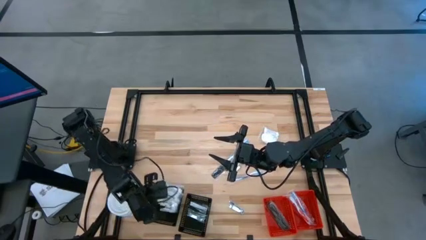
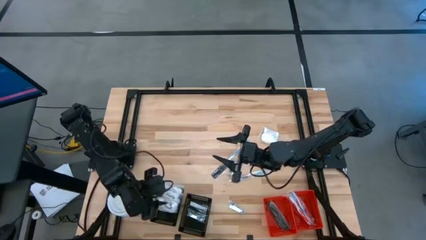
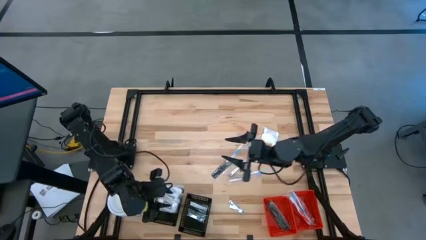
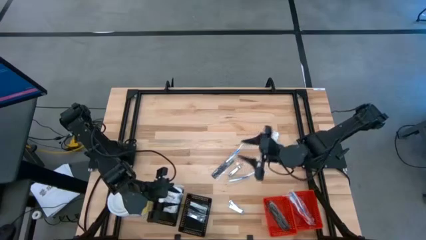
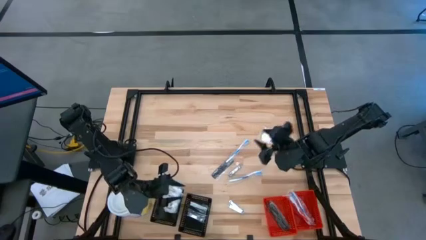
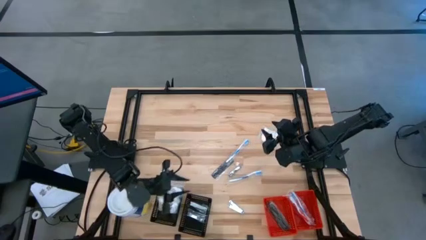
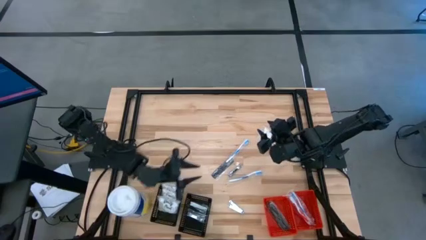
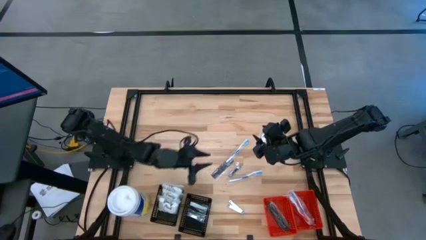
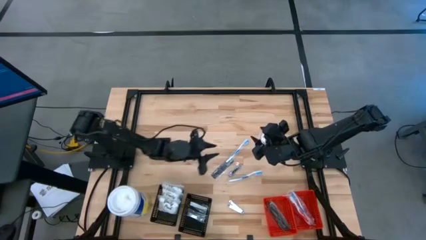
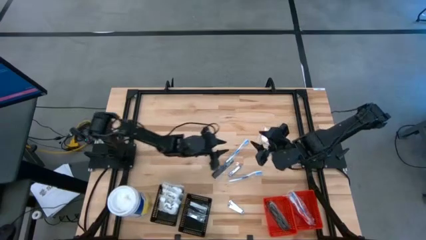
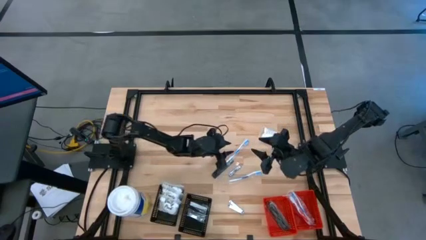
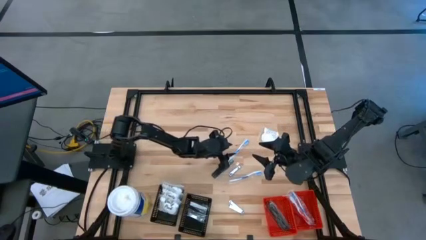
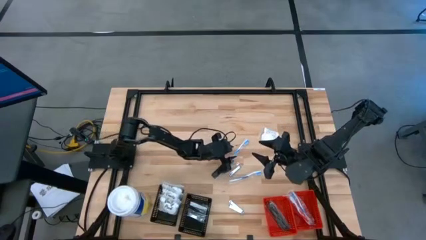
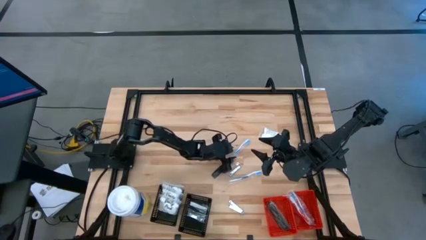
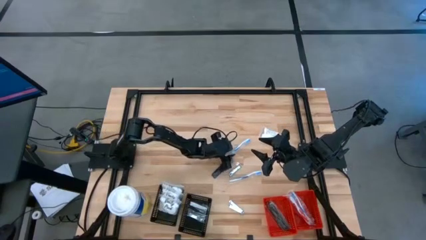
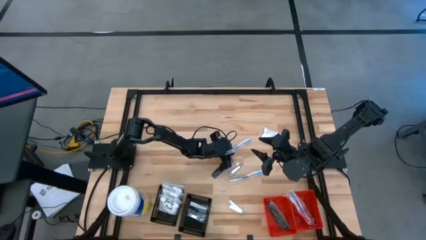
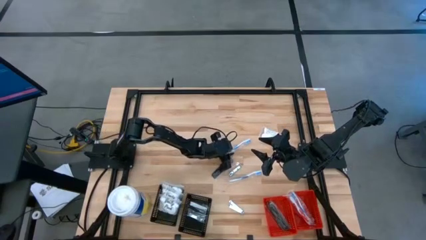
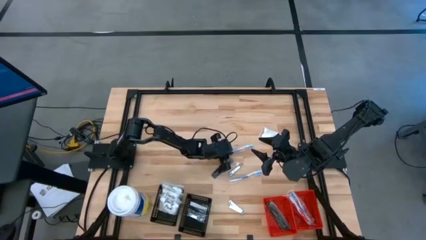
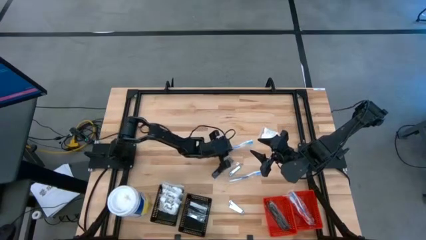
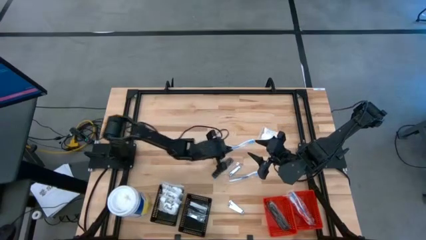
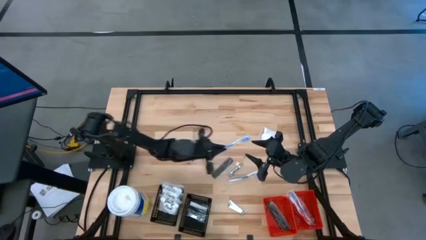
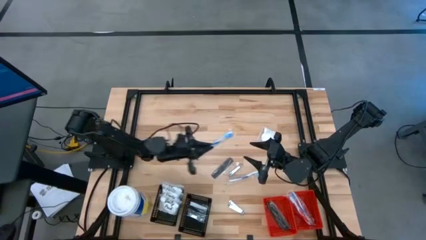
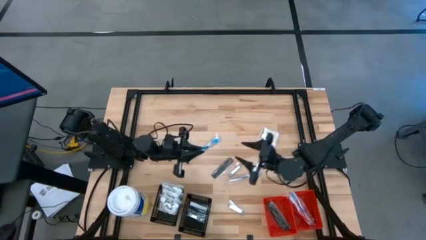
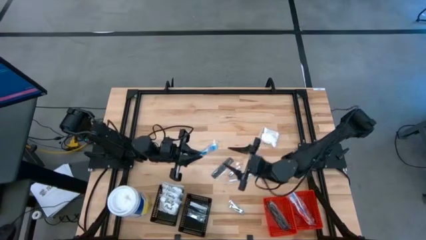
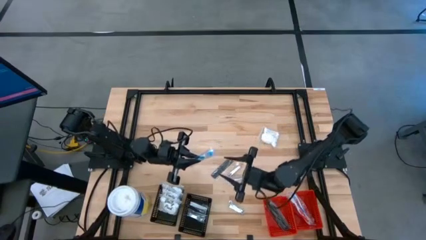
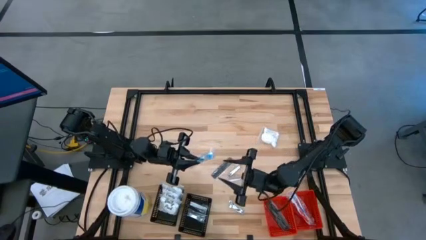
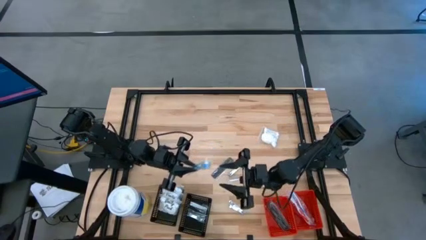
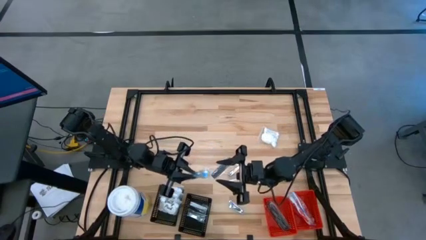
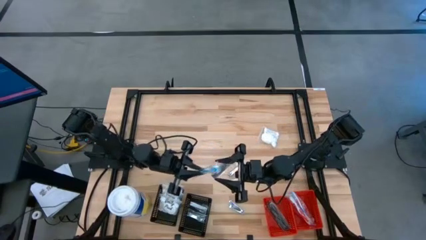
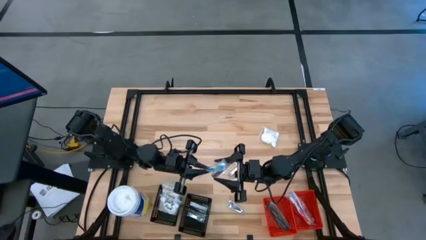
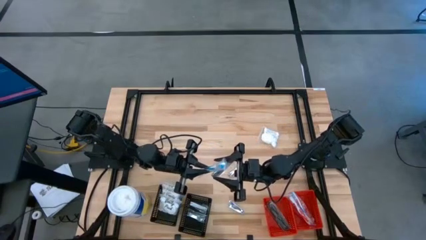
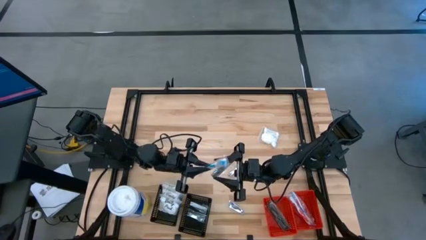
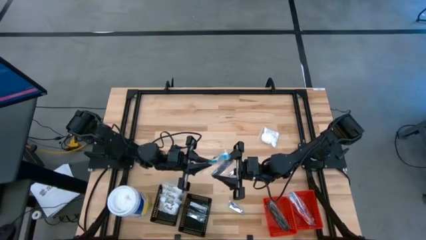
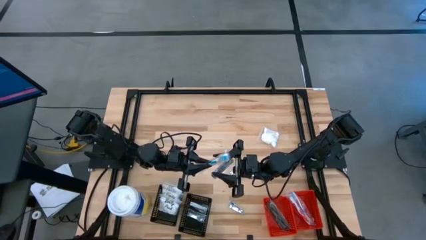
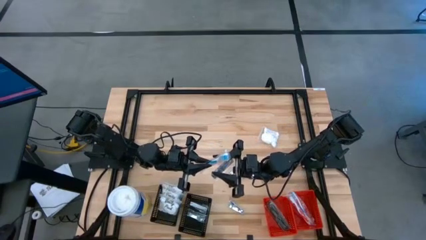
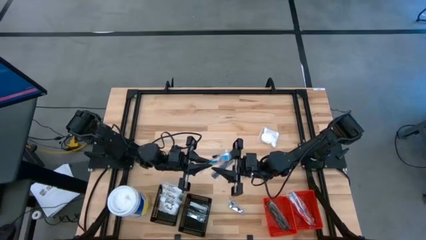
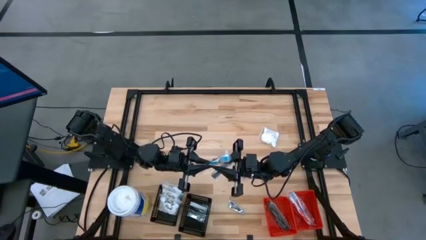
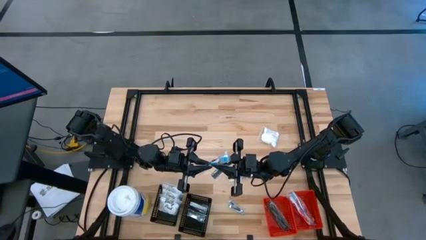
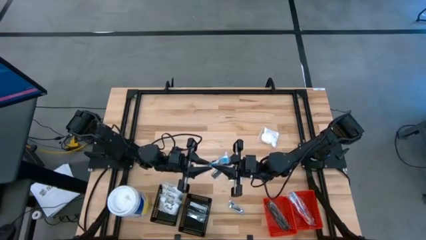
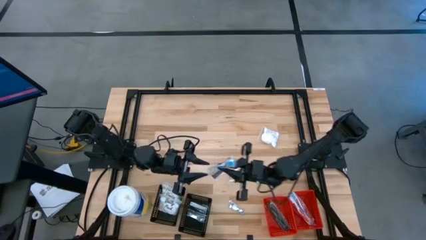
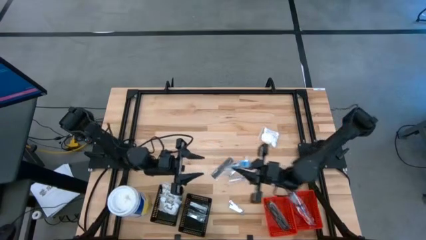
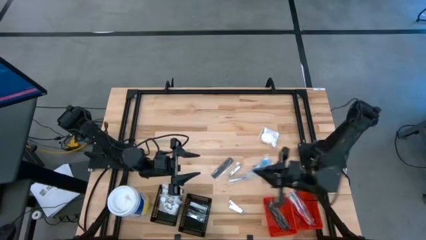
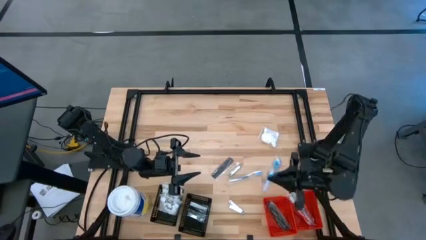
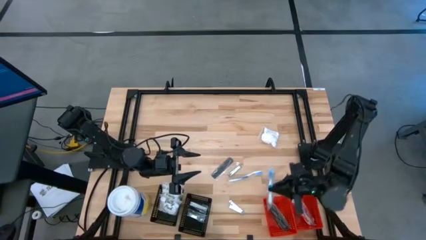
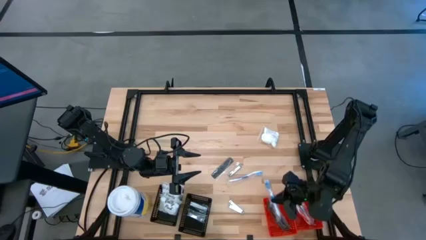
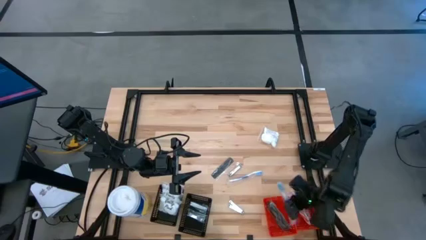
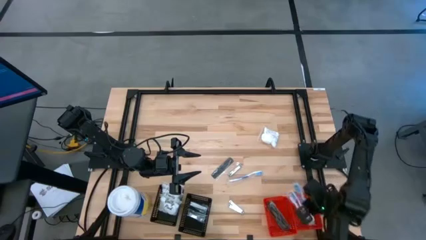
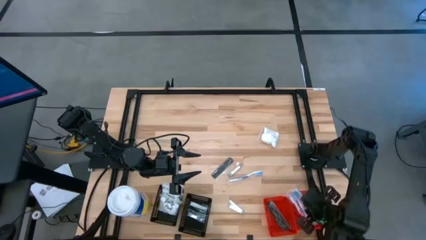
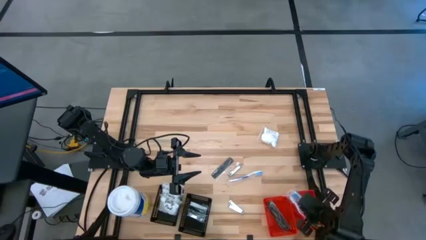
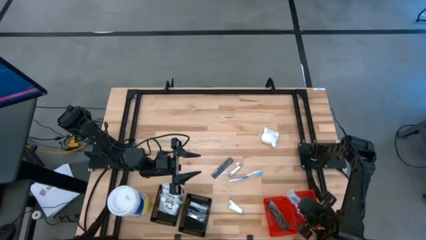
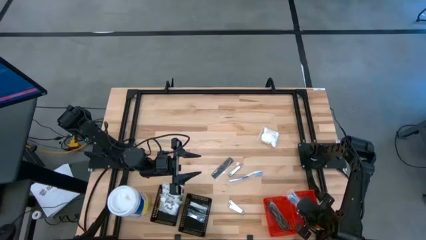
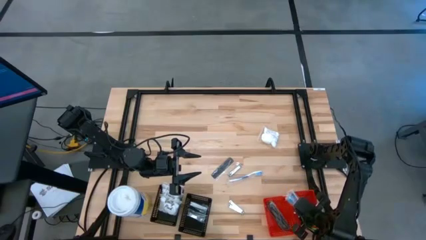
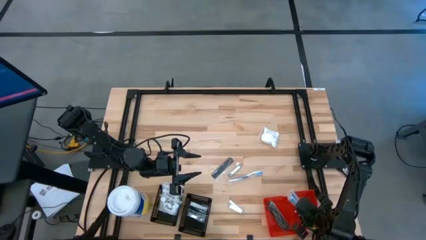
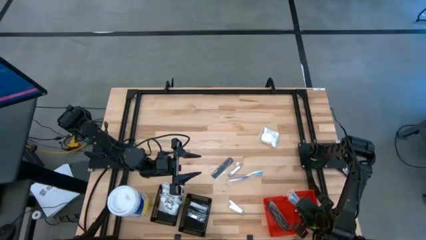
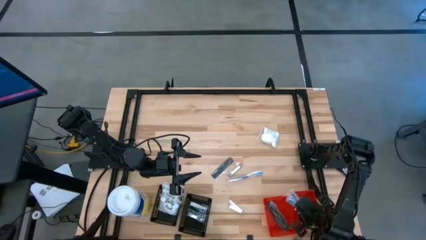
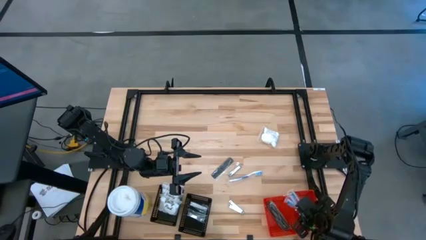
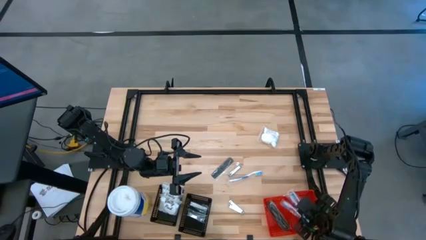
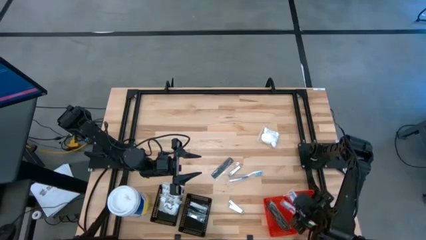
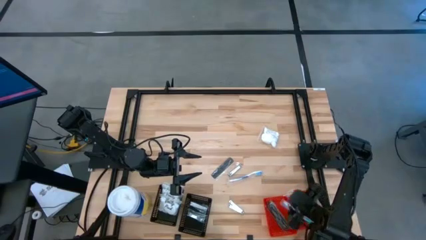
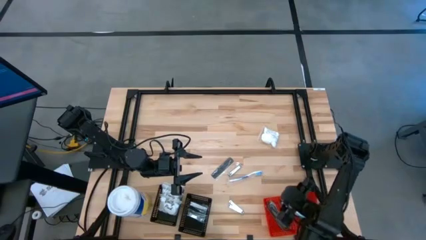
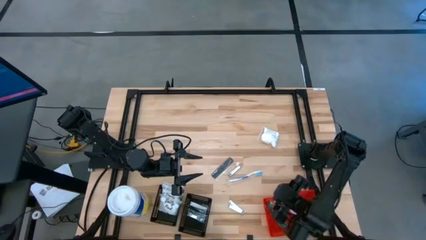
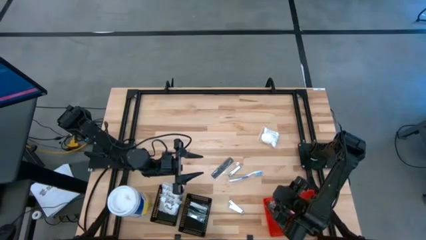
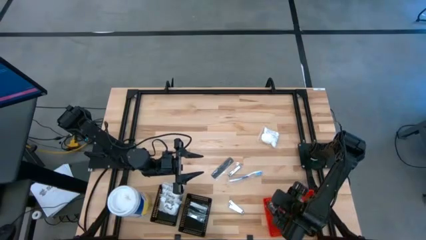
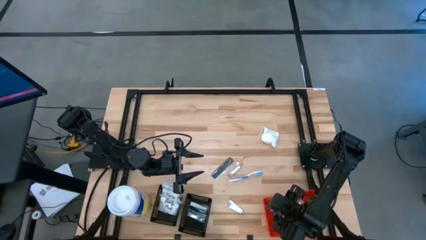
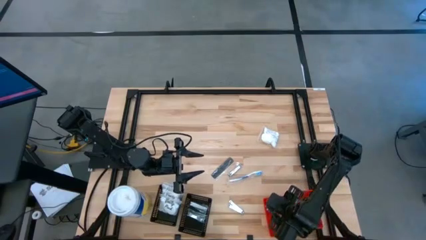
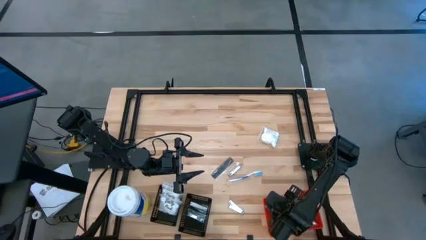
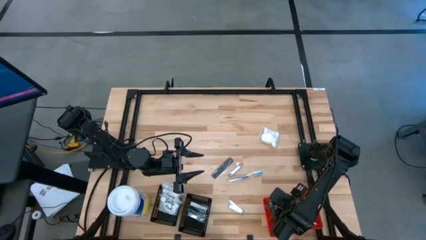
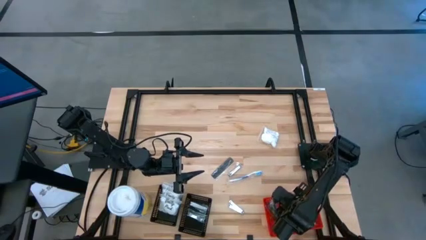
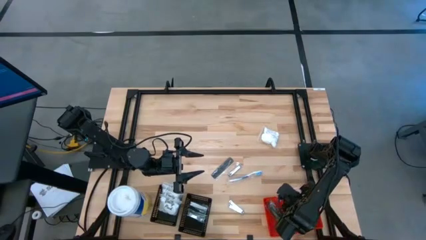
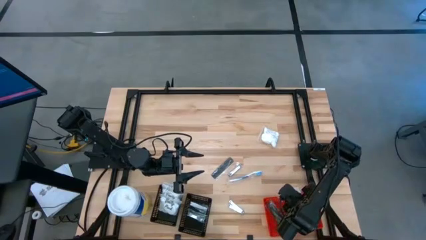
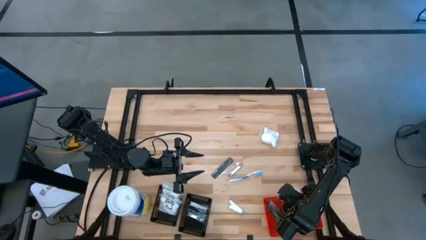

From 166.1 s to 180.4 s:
Task: Pick & Place Travel size toiletries
Put the blue toothbrush into the right red bin
